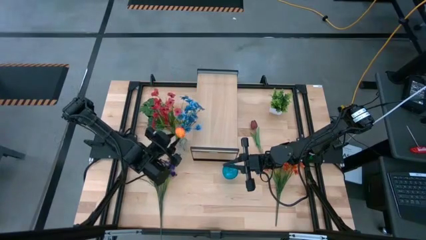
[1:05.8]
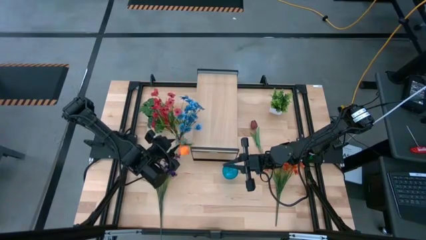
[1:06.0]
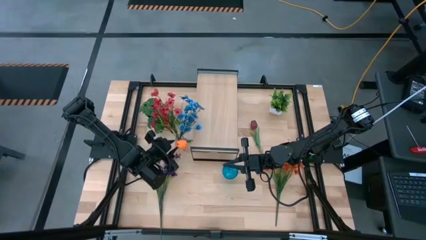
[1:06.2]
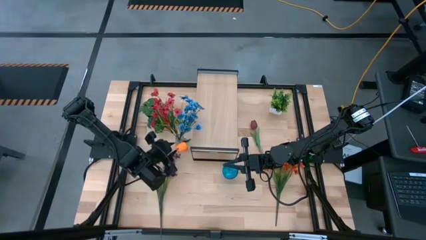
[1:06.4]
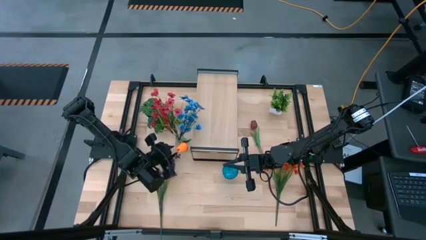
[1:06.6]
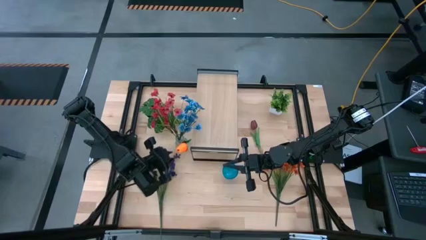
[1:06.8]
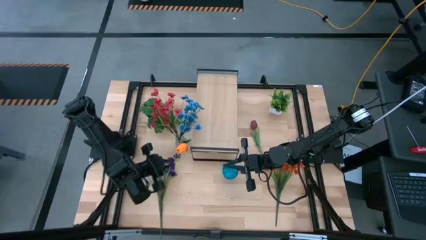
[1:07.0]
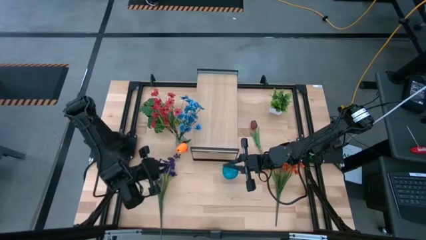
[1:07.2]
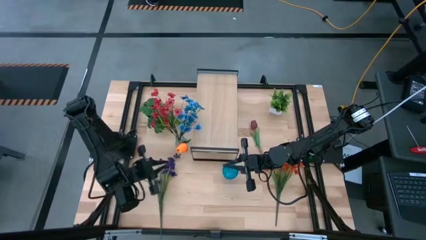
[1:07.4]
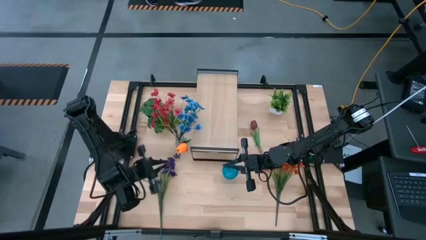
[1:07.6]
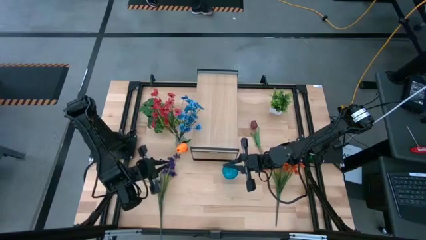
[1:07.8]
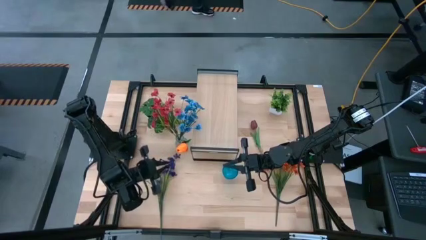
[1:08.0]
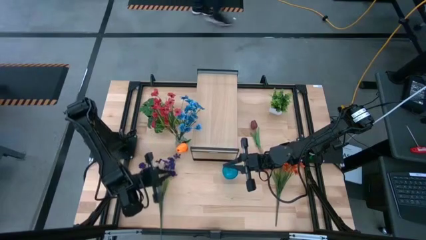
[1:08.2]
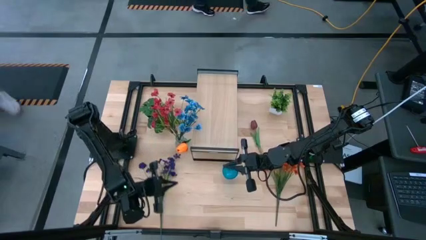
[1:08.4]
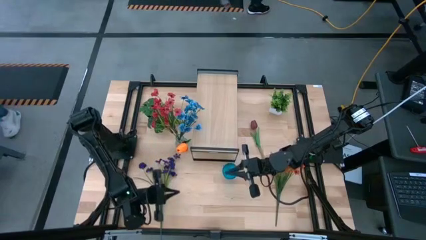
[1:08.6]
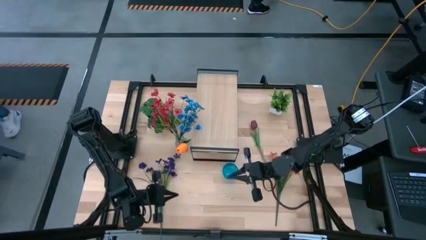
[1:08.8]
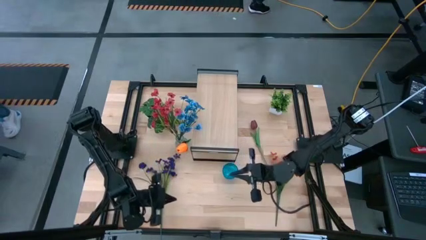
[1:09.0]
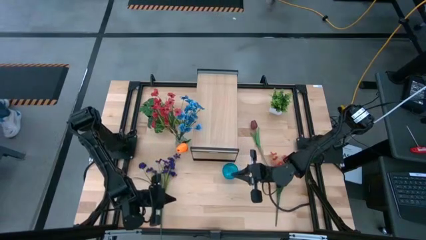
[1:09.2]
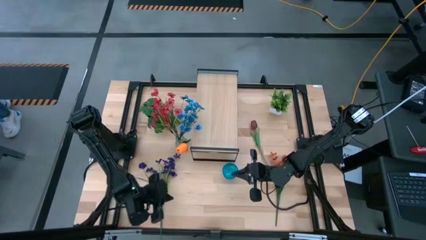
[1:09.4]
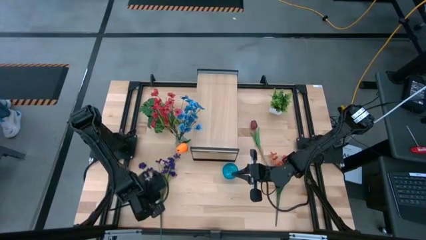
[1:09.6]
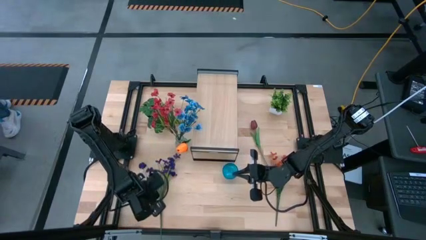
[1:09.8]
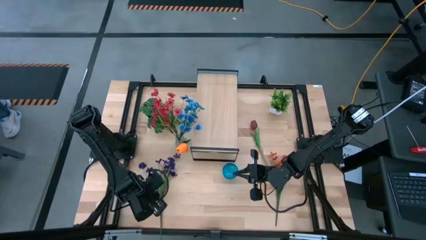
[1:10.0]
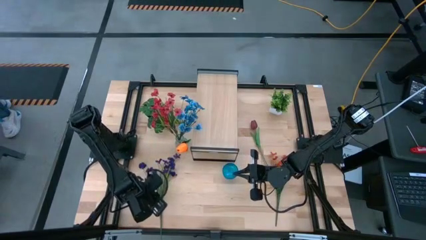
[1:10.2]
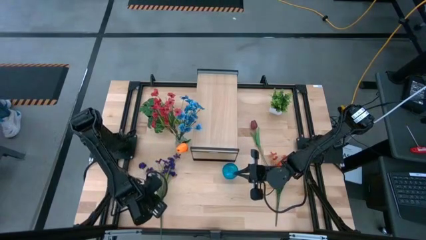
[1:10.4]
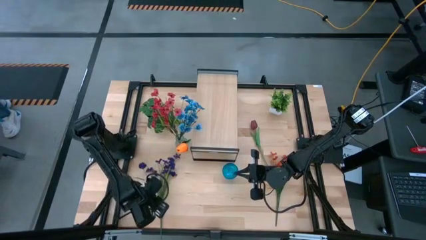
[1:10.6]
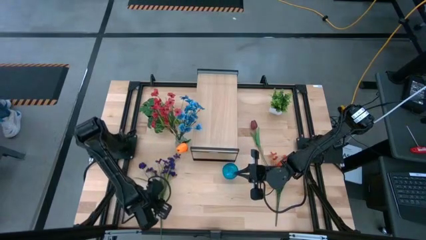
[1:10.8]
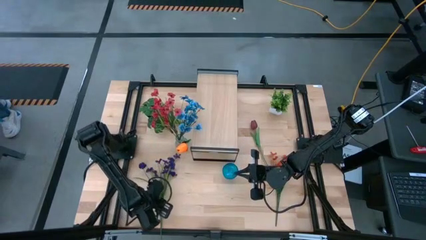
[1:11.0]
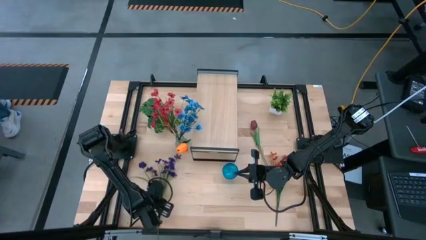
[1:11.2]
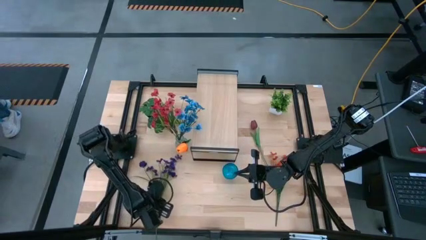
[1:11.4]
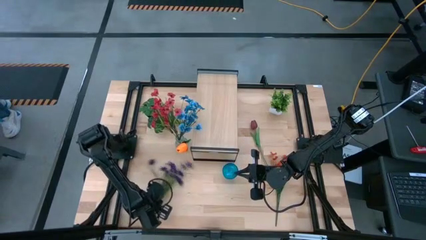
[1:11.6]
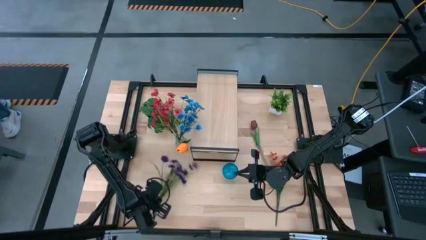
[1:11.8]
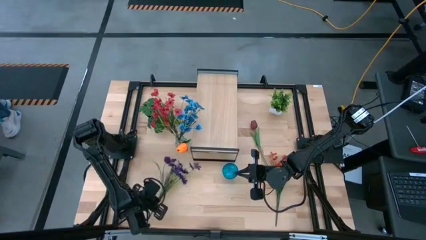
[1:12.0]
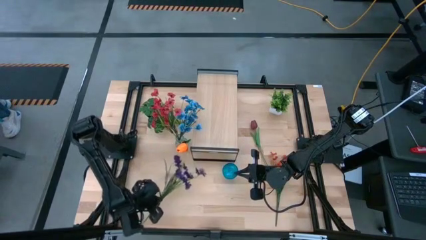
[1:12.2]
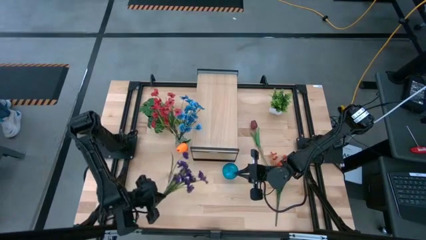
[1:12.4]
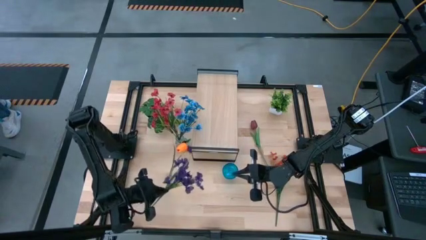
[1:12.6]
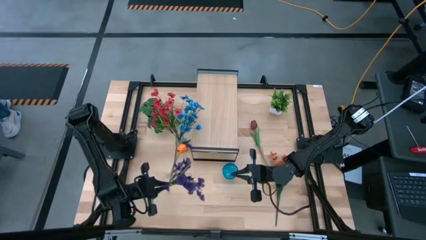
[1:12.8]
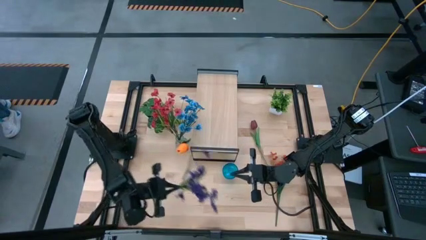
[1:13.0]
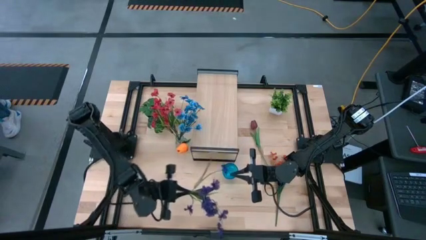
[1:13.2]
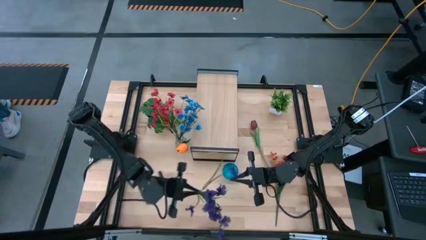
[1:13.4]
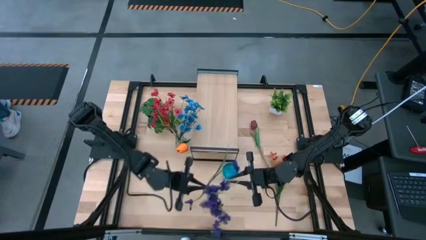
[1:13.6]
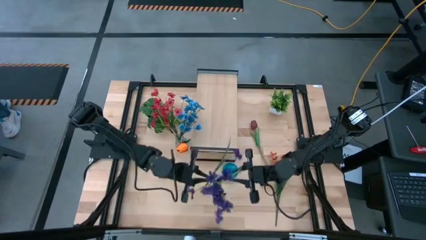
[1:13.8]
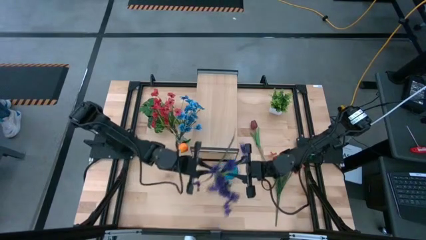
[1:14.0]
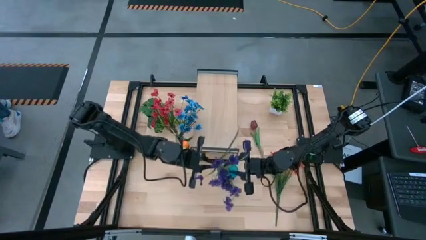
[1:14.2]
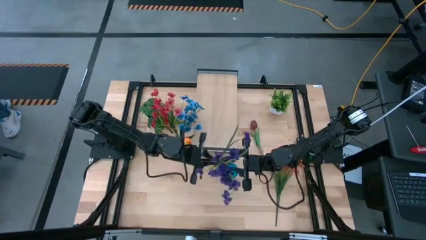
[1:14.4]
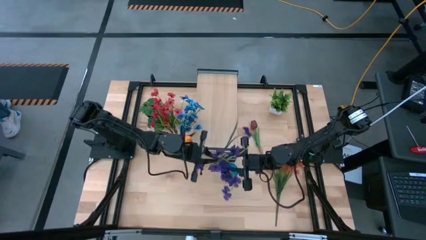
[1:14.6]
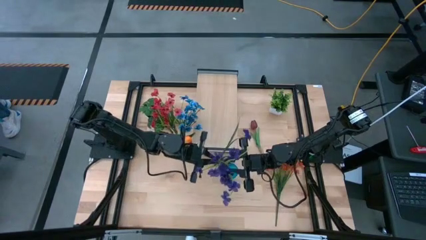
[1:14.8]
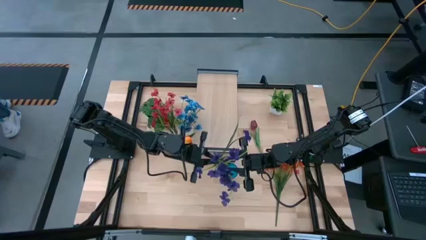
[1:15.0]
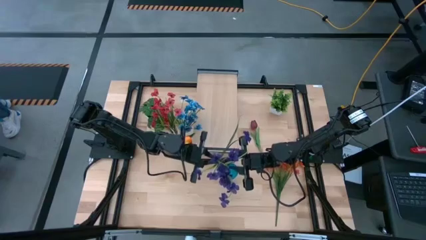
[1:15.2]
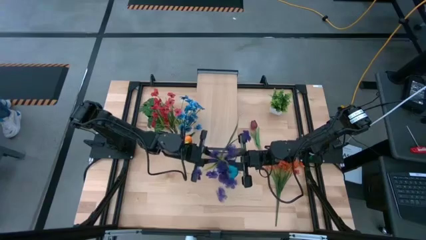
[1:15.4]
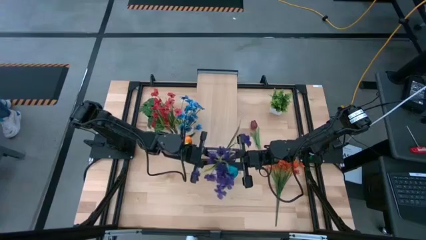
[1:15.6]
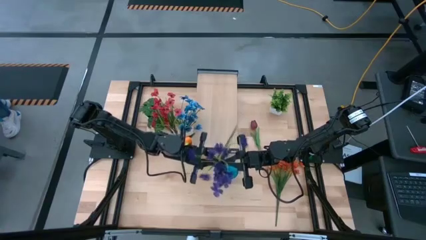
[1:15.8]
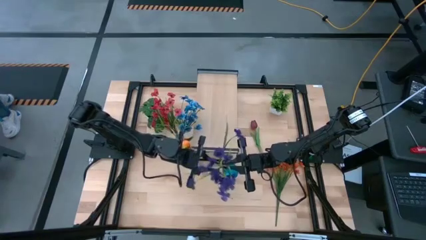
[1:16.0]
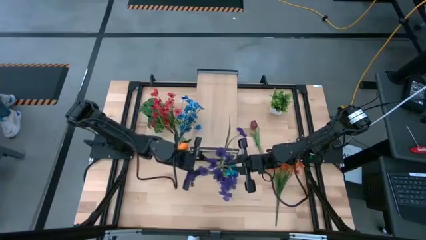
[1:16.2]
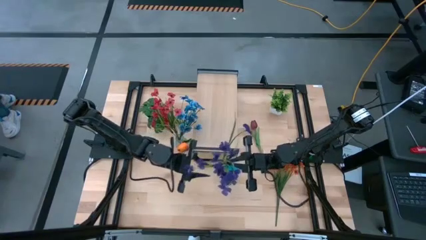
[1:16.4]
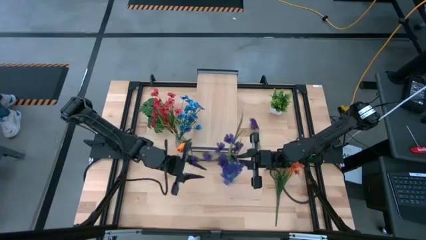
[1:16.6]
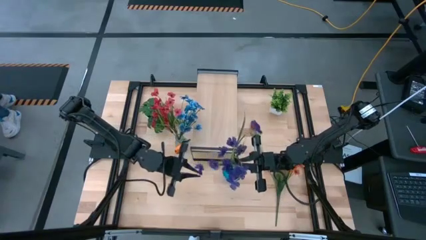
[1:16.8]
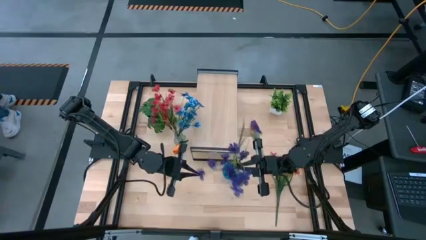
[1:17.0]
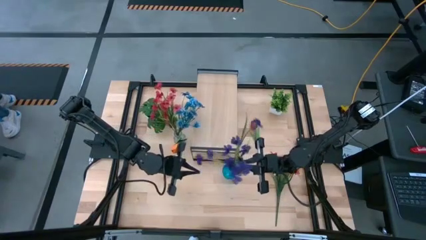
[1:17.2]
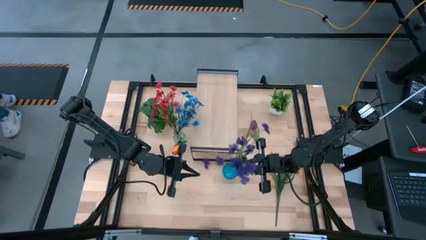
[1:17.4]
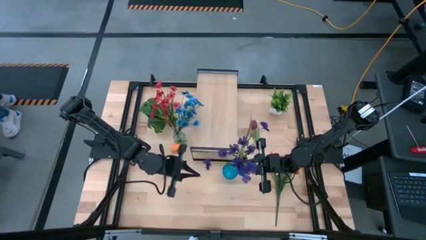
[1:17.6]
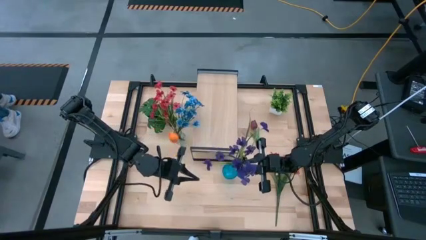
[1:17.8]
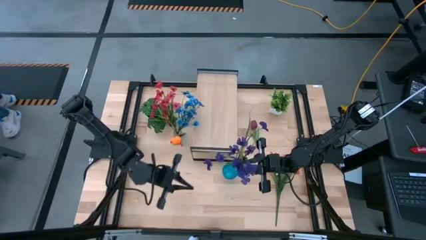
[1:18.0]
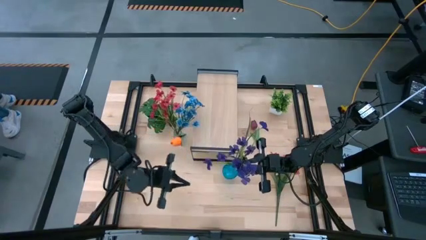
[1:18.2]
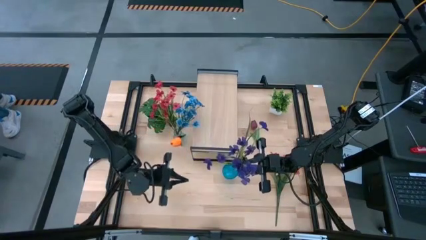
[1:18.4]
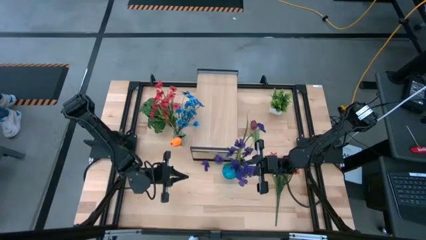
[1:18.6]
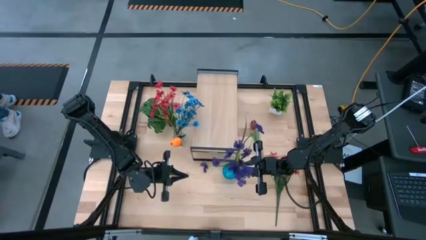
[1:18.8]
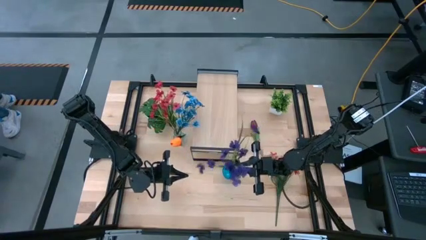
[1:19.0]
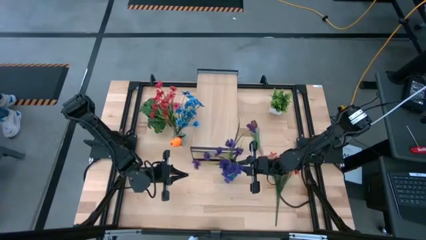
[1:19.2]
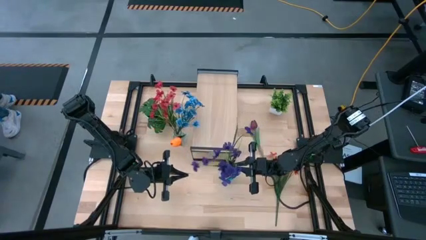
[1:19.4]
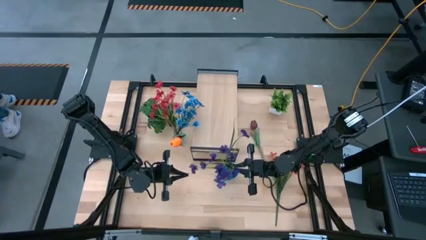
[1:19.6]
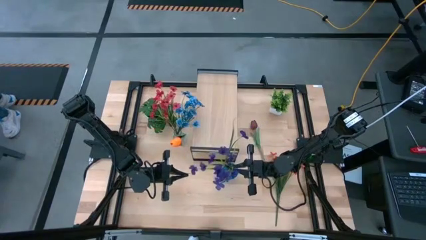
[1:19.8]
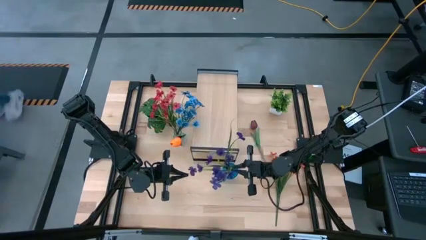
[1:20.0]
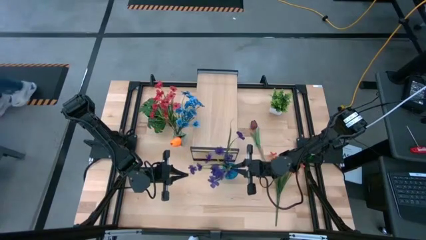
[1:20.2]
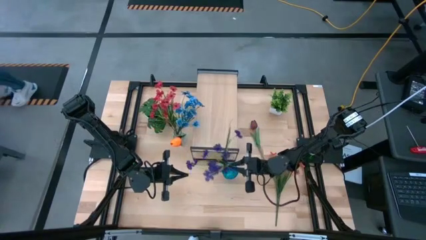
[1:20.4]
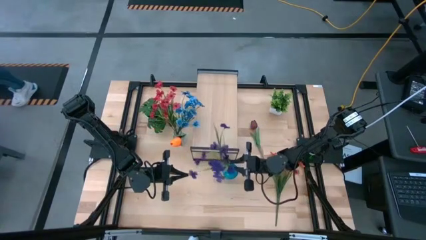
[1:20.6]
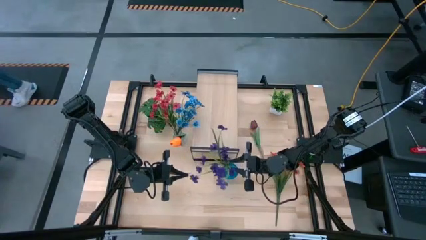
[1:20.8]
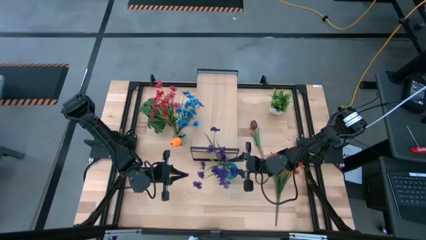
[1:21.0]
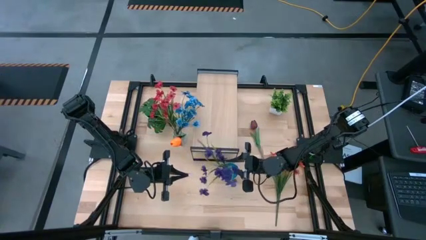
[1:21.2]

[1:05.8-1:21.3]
Task: Pick and place flowers into a vace then onto a shelf
Put the purple flowers into the blue vase

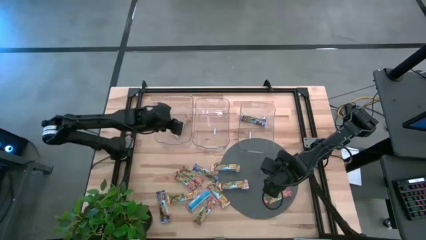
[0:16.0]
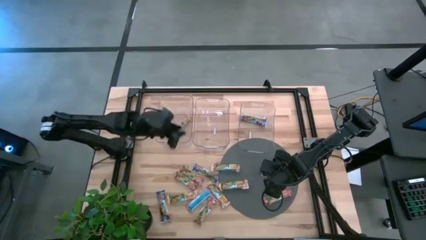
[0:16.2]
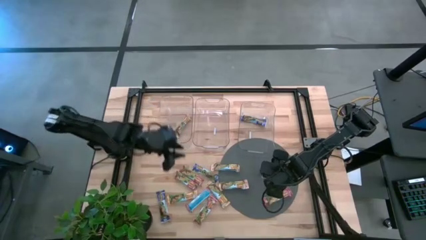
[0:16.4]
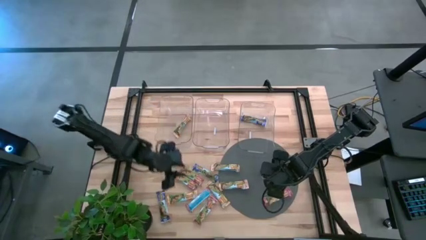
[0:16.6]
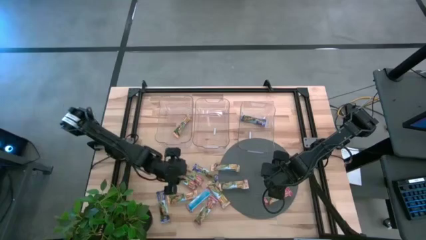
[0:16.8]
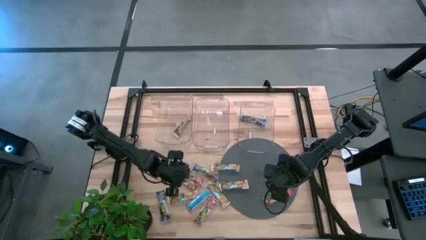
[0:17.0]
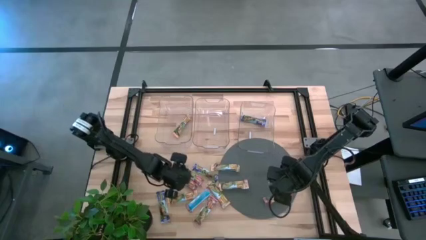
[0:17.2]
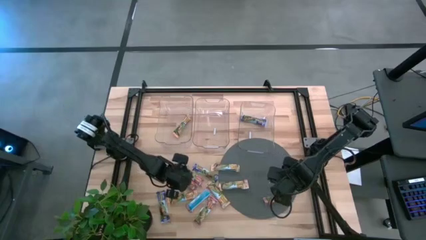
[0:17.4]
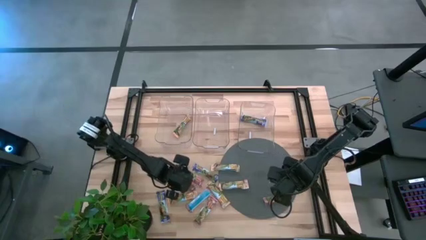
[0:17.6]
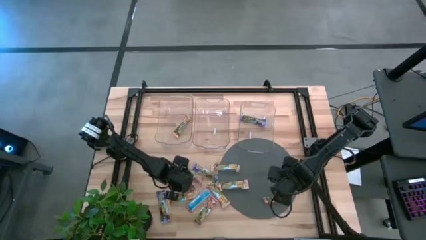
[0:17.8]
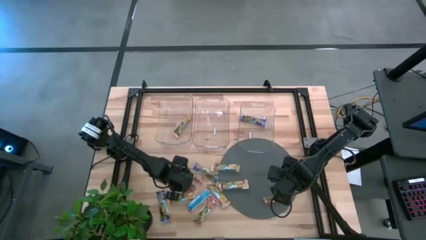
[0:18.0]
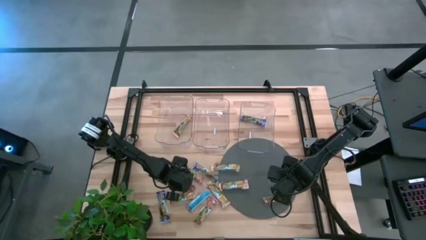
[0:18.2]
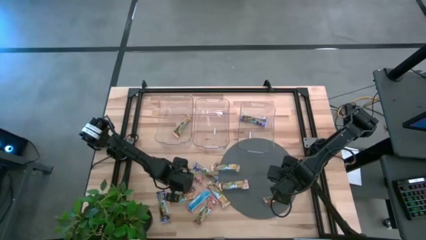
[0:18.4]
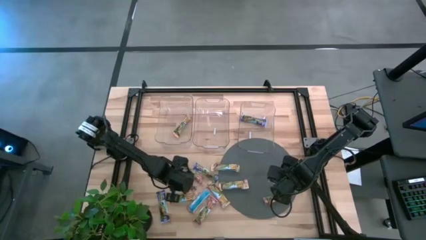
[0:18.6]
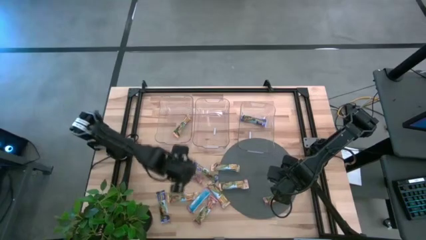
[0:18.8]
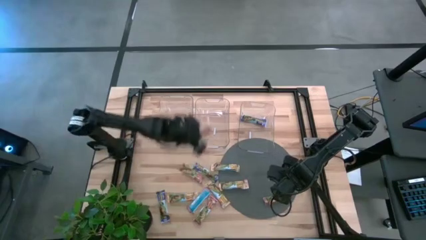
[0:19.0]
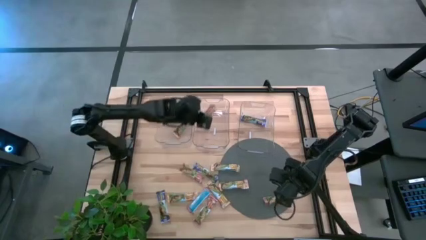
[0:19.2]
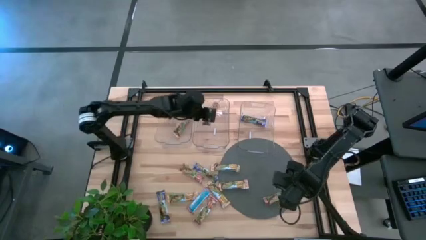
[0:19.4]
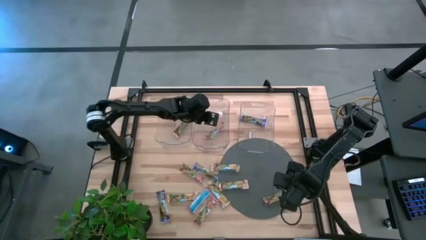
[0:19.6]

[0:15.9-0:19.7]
Task: Pick and place Granola Bars by type
Put the red granola bar into the middle transparent bin
